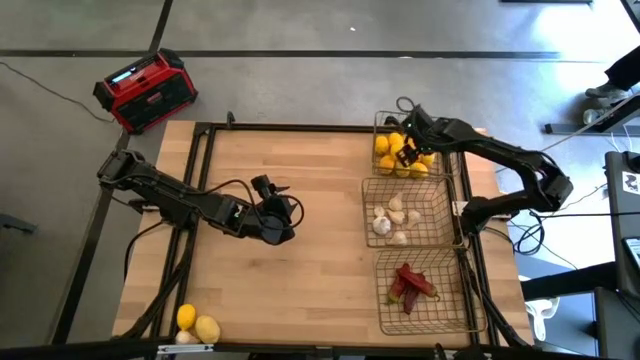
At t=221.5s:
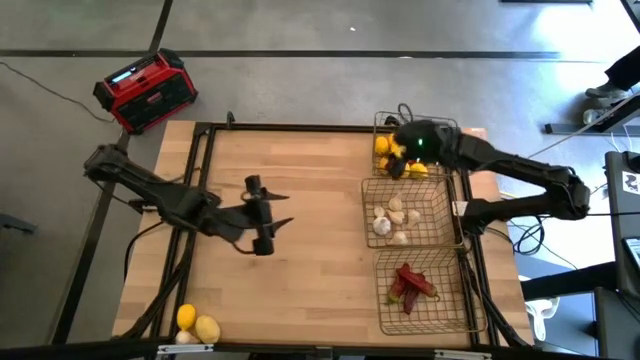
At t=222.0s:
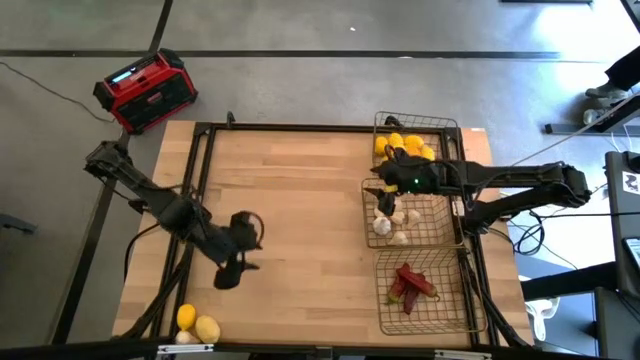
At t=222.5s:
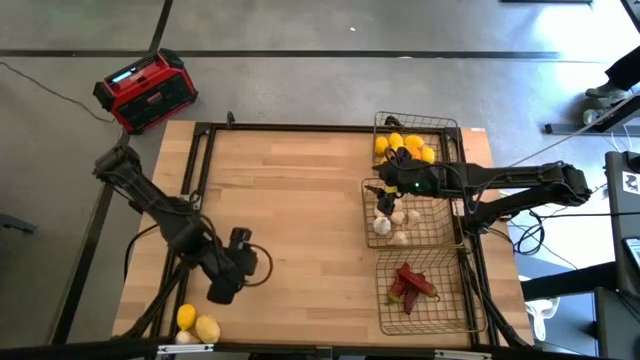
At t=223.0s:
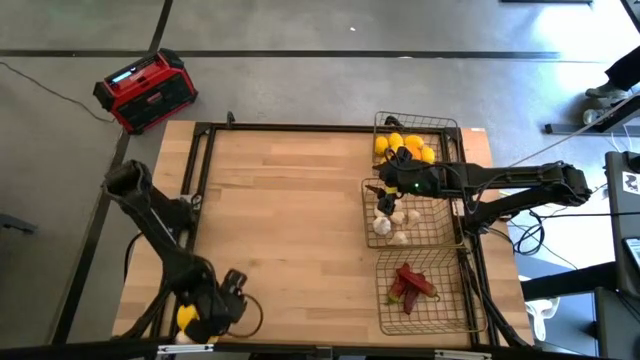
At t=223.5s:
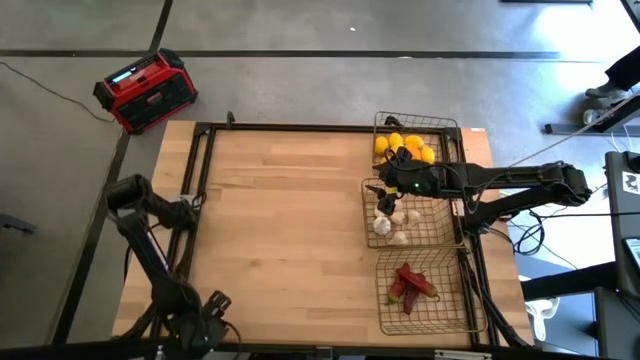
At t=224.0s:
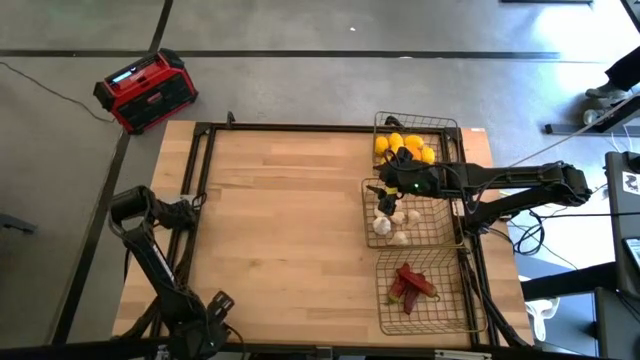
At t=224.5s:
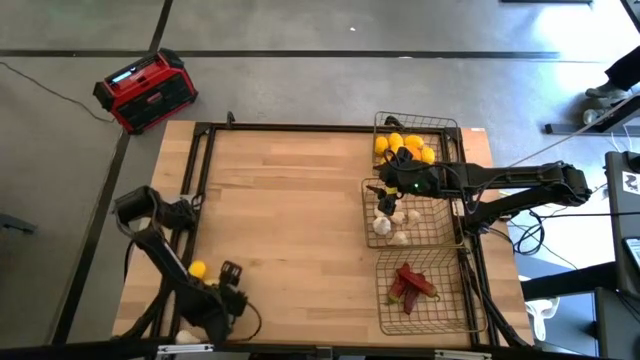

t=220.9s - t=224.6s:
Task: Sort produce into baskets
Put the yellow lemon into the top wire basket

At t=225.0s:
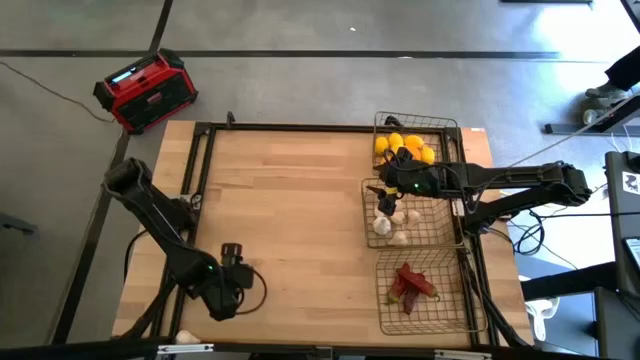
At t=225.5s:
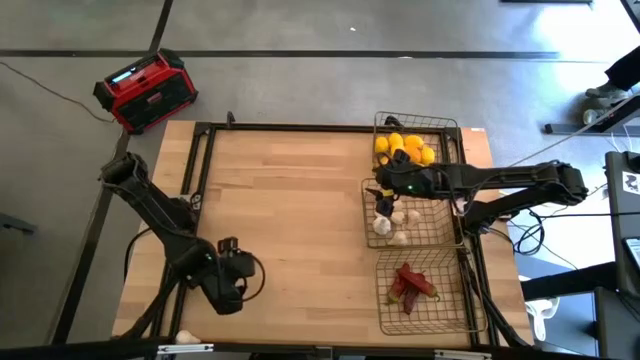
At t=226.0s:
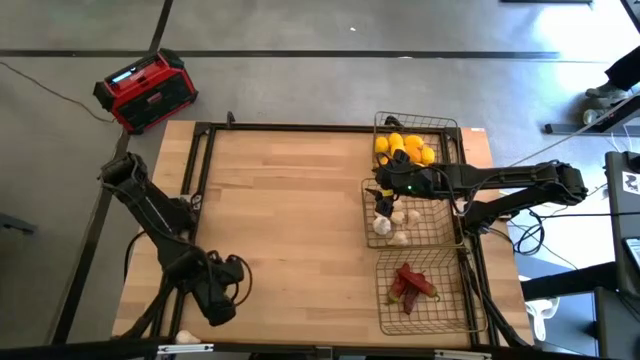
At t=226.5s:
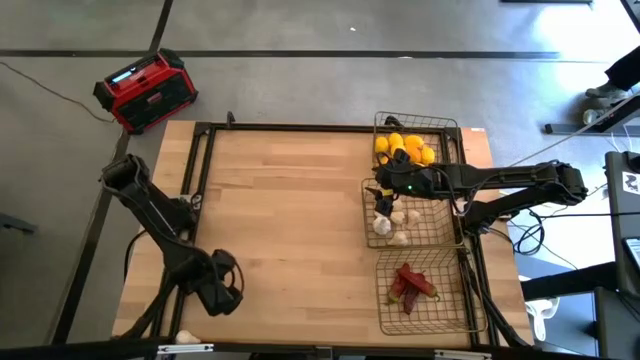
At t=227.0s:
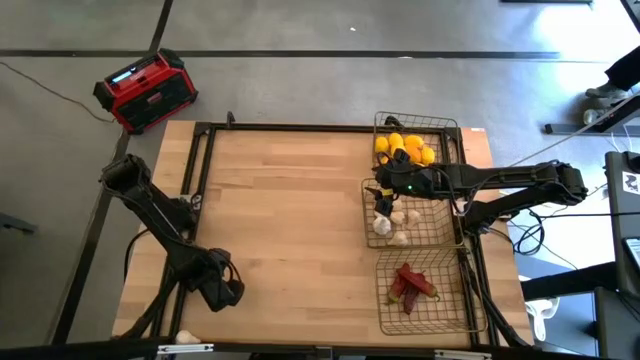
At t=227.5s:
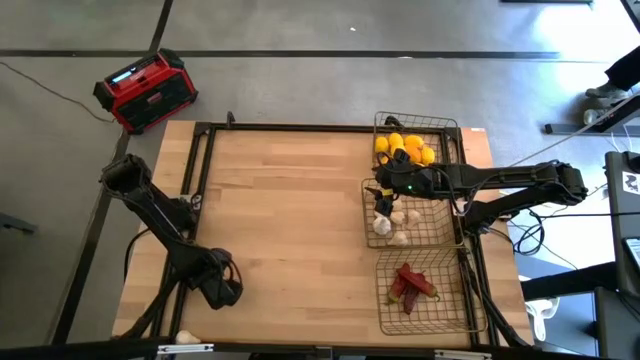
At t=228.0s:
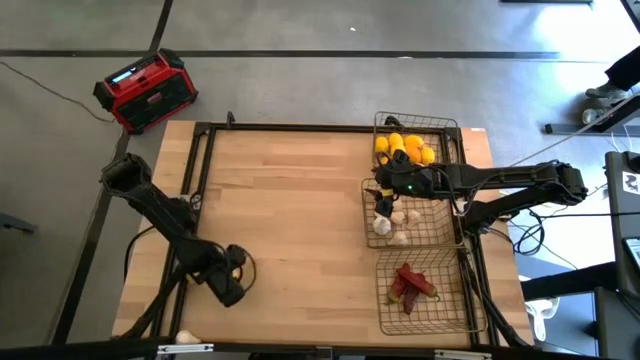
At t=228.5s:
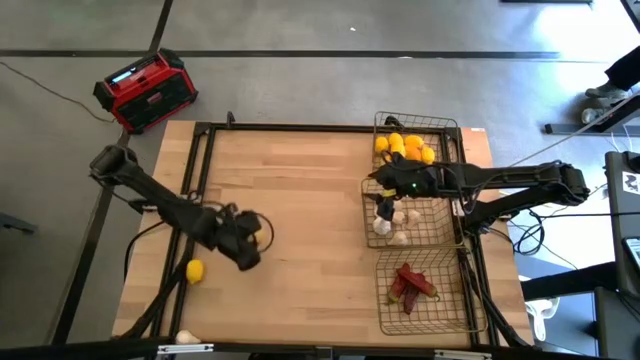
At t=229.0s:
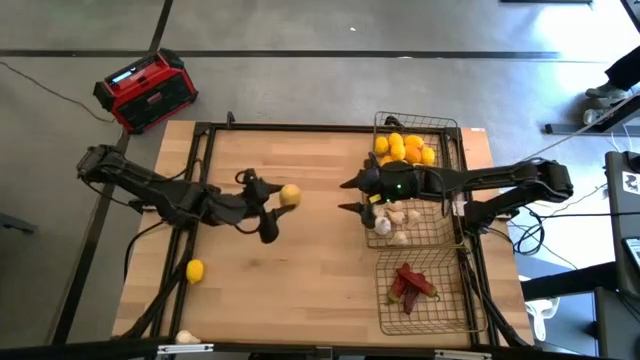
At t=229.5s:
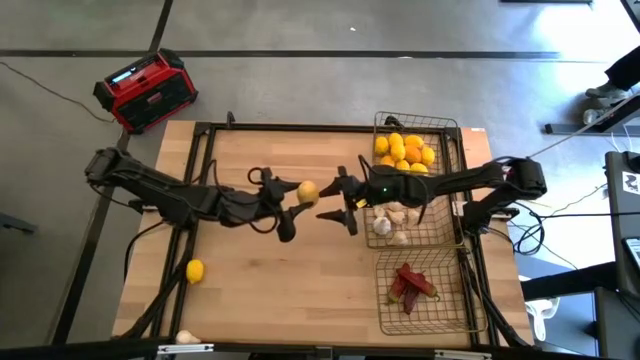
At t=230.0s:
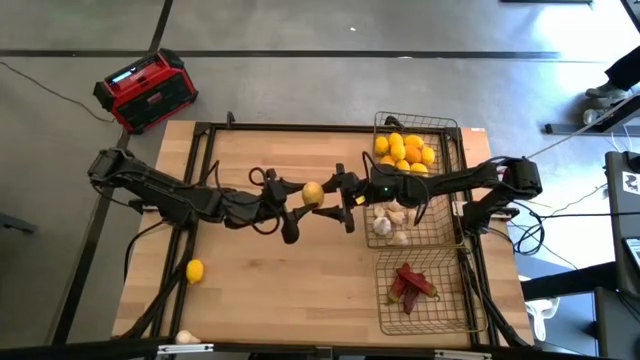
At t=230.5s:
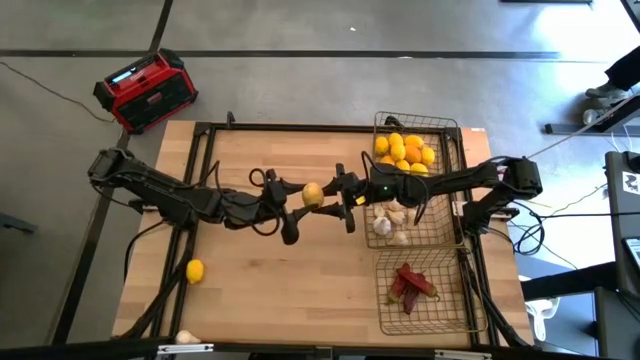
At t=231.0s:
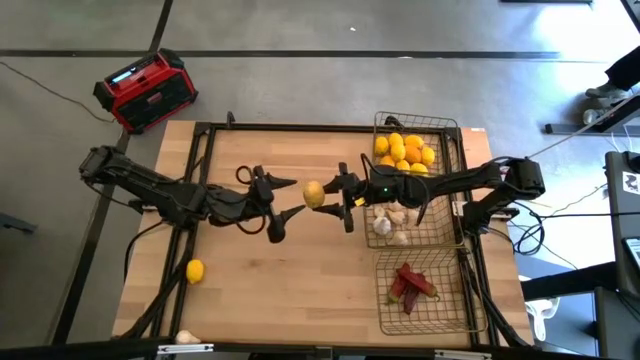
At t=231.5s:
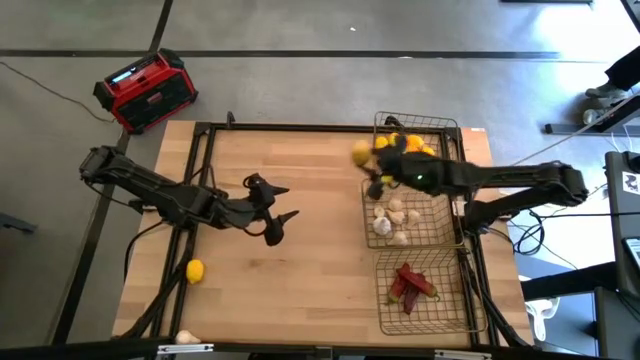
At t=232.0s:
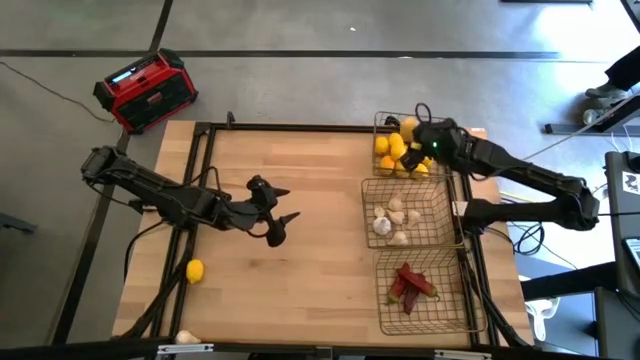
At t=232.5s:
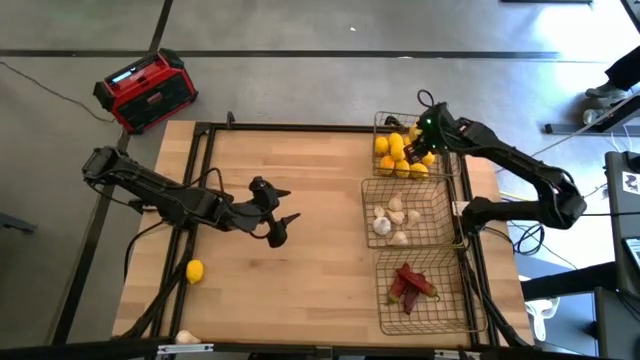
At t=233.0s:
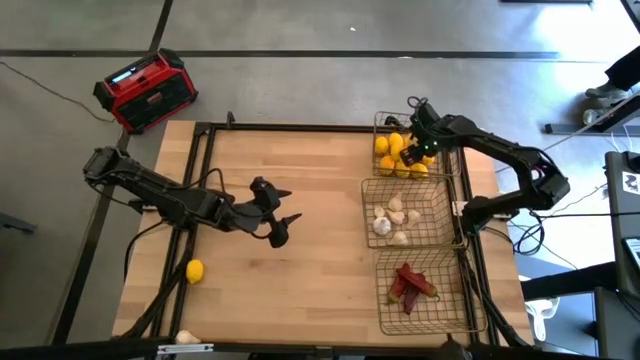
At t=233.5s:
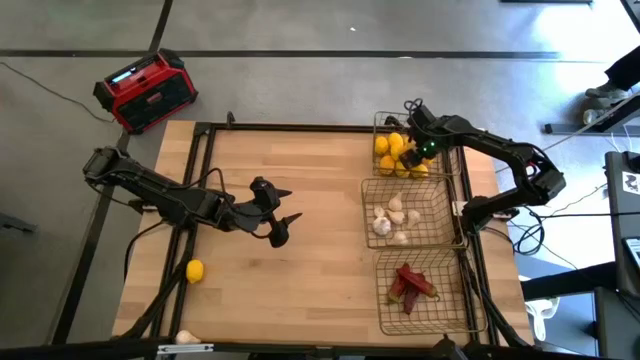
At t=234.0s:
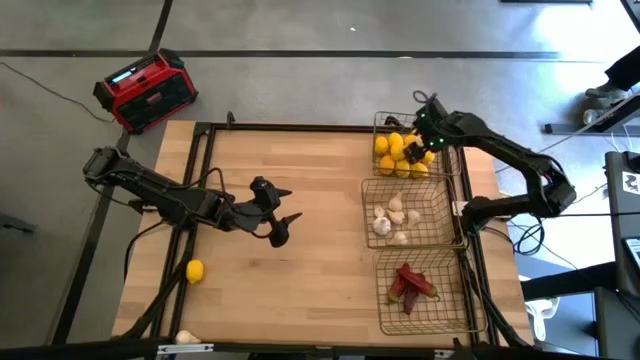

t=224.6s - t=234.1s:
Put the yellow lemon into the top wire basket

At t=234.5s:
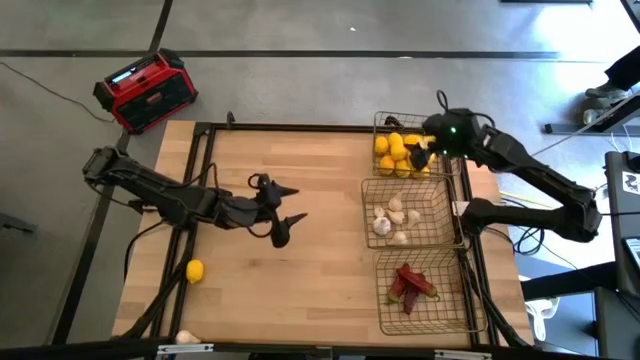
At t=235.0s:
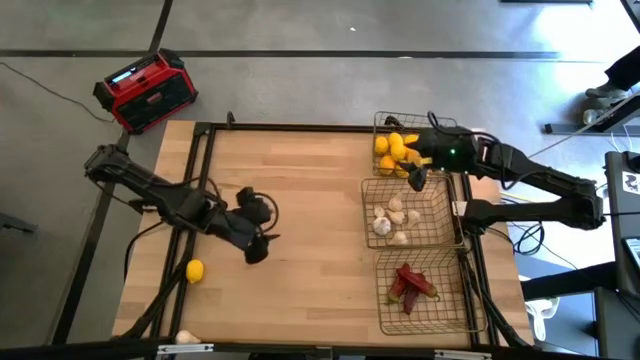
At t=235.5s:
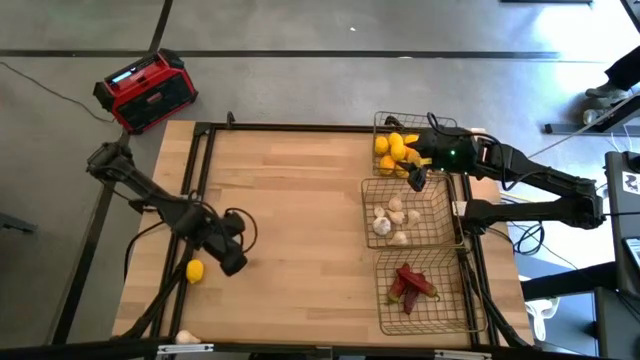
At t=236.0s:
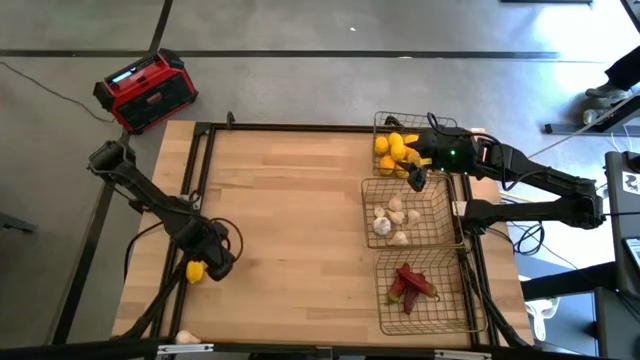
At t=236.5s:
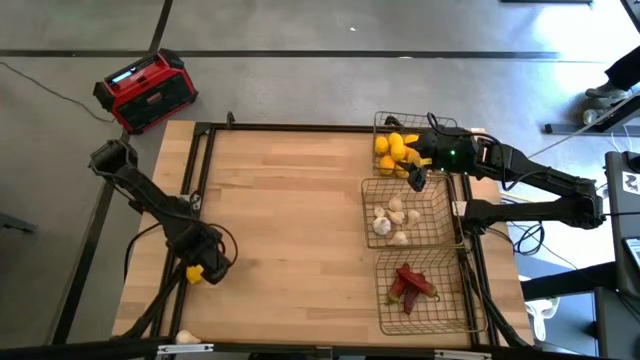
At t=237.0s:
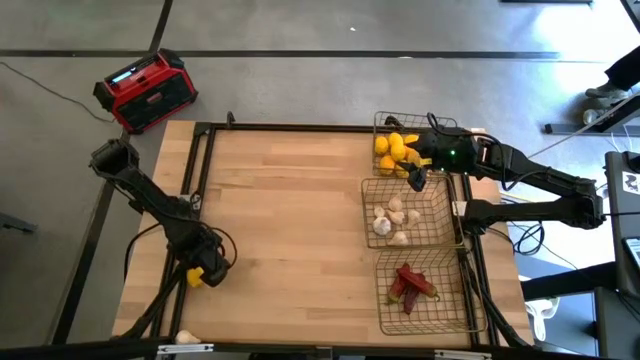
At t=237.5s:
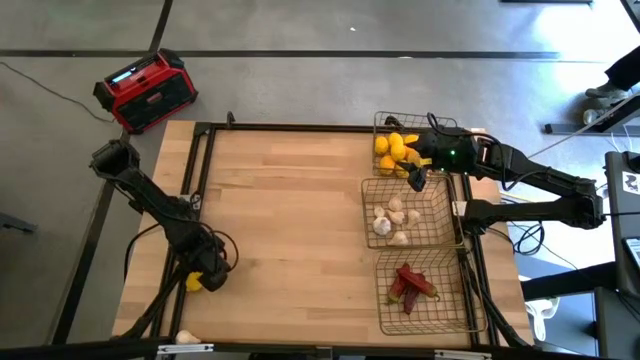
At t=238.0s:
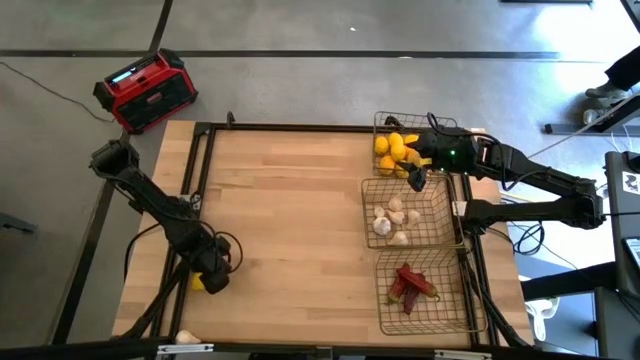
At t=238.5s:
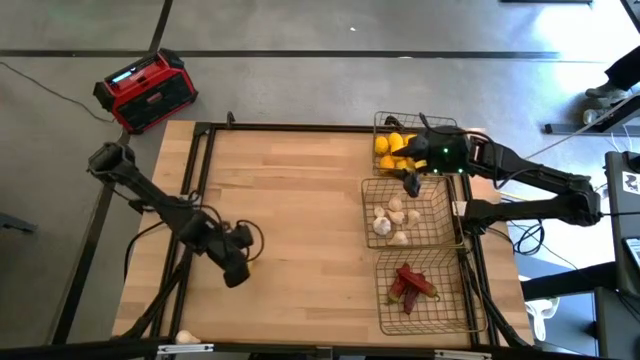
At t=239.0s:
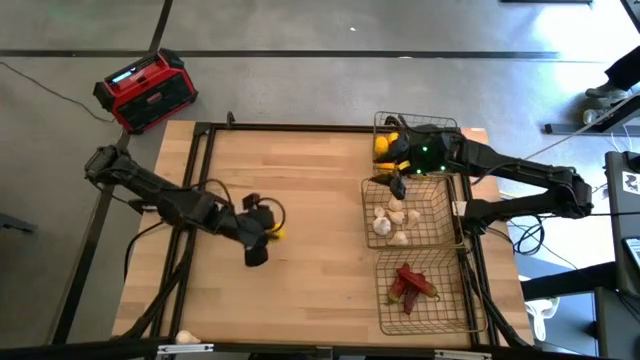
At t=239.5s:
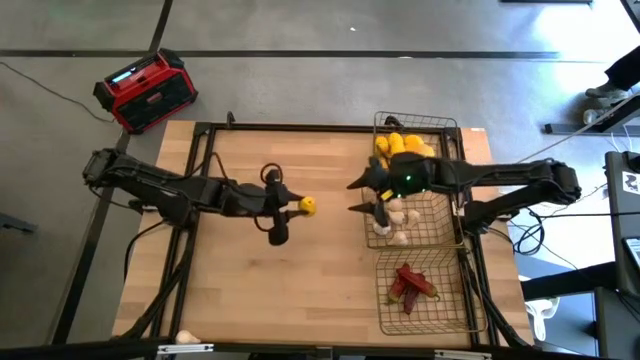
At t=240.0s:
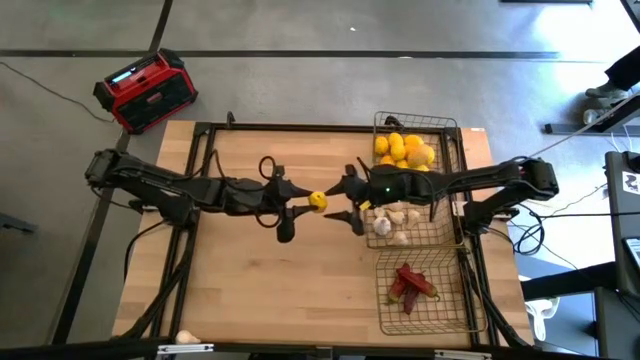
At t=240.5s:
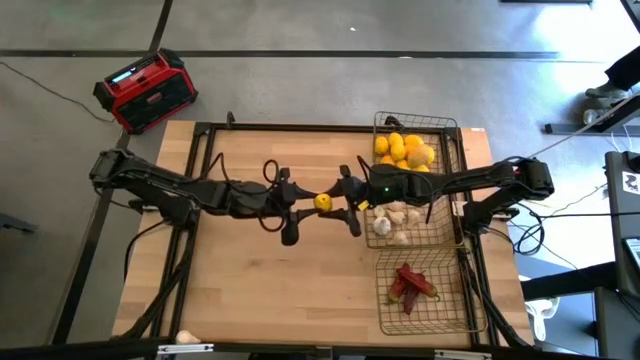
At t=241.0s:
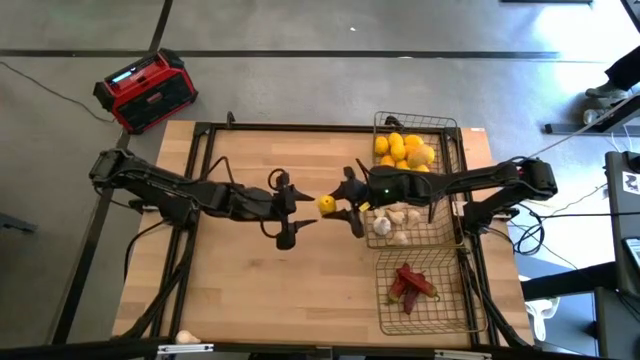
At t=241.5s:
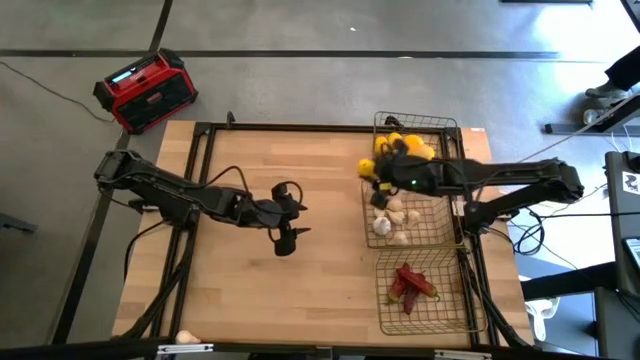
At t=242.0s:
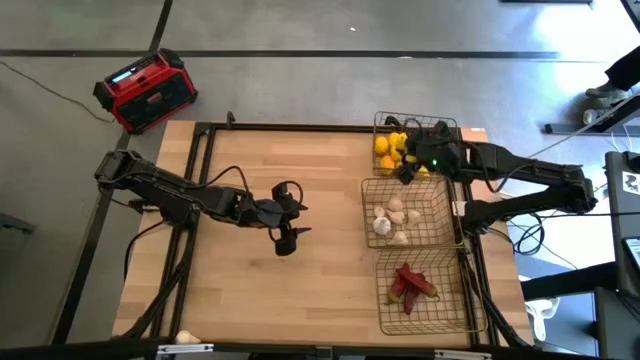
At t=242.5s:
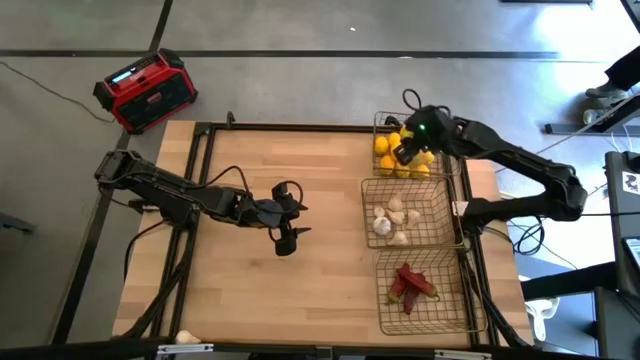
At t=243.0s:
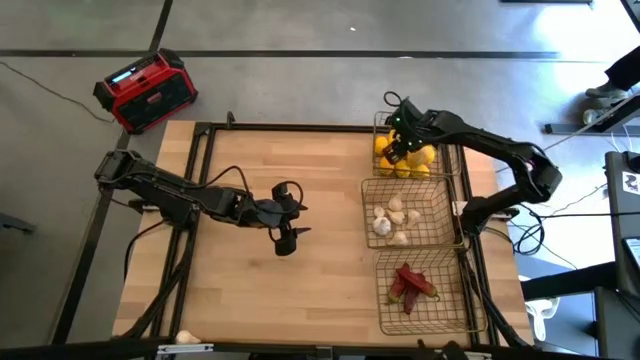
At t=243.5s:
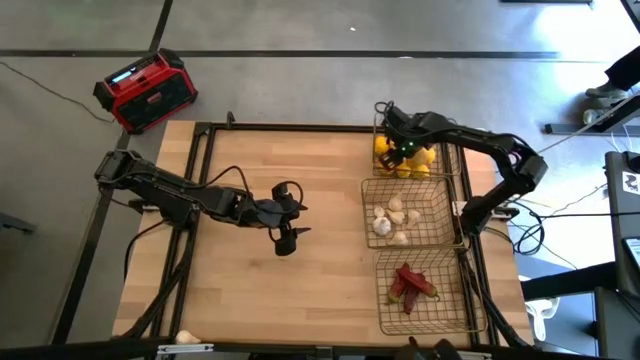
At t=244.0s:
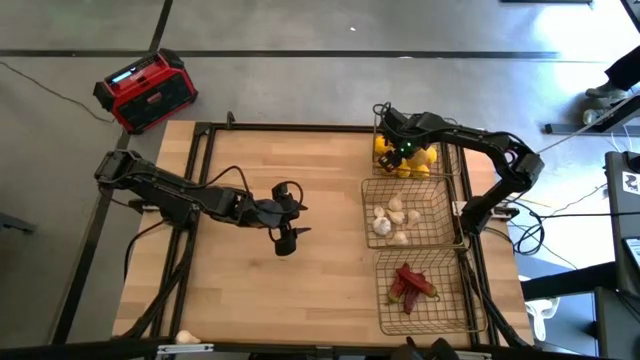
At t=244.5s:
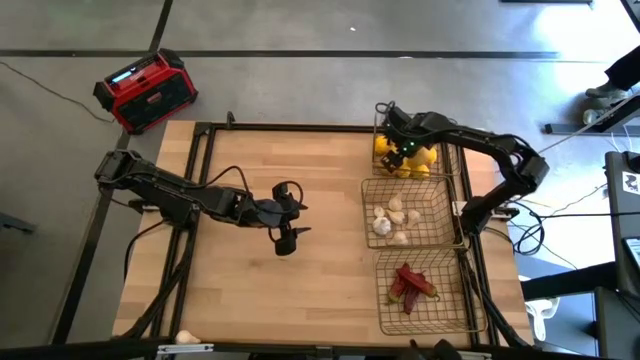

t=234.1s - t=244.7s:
Put the yellow lemon into the top wire basket
